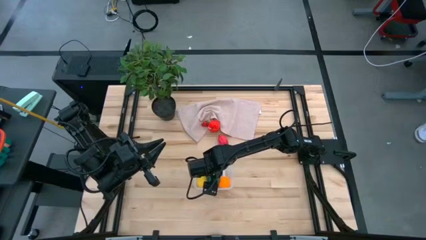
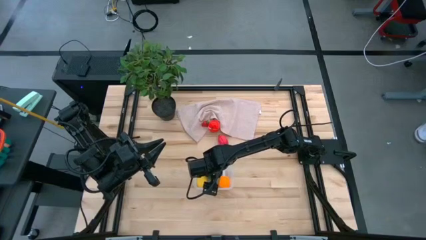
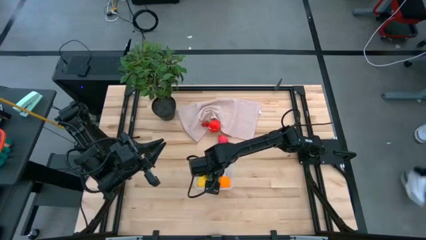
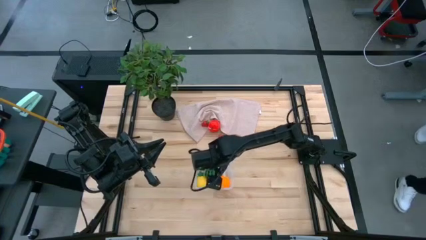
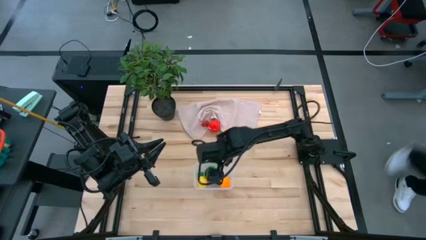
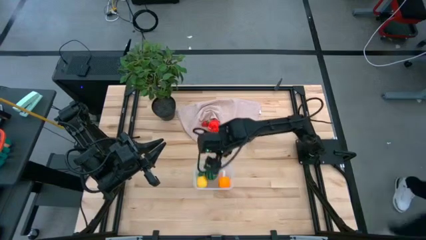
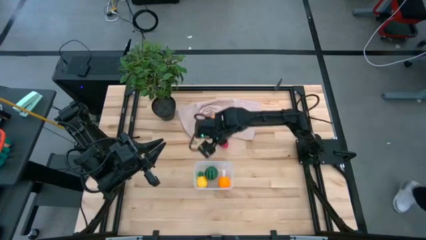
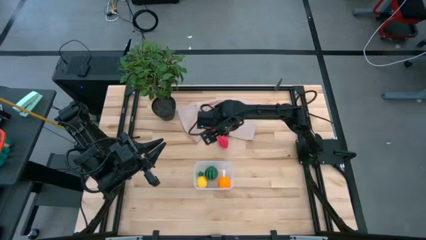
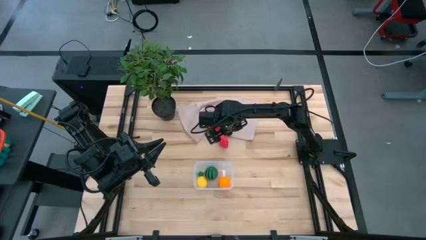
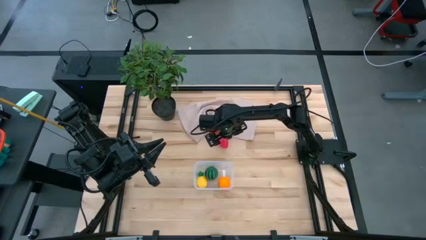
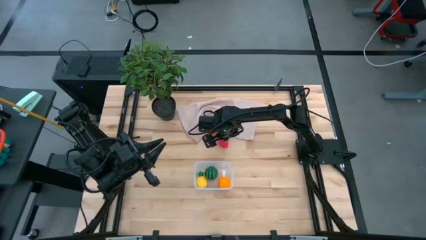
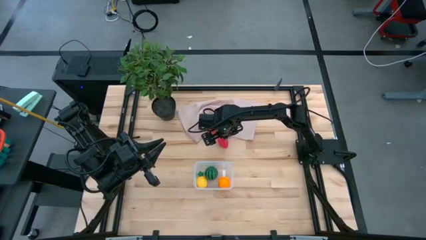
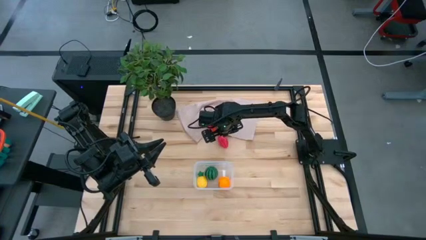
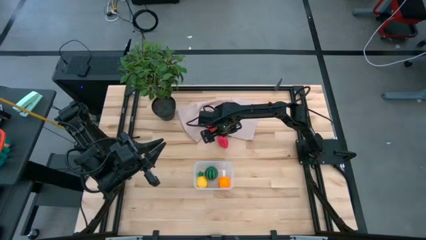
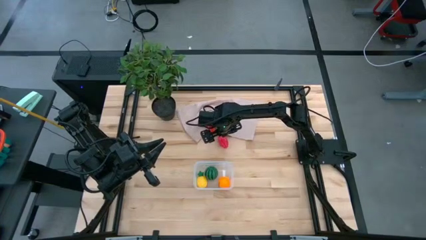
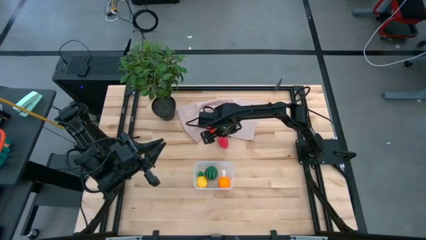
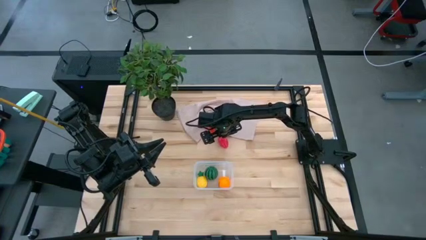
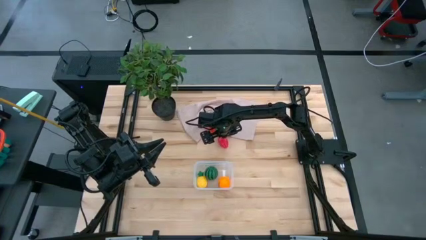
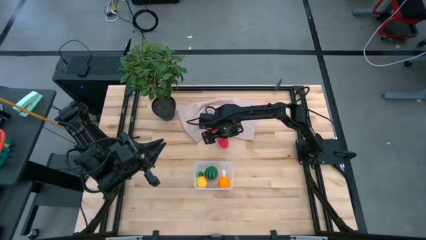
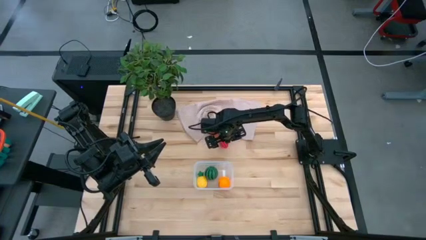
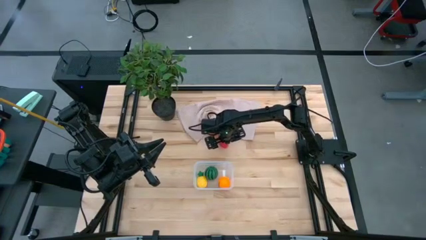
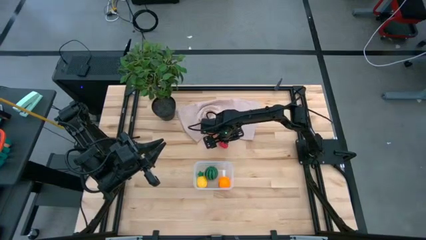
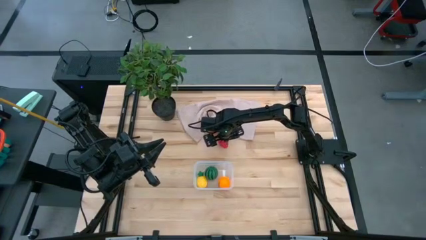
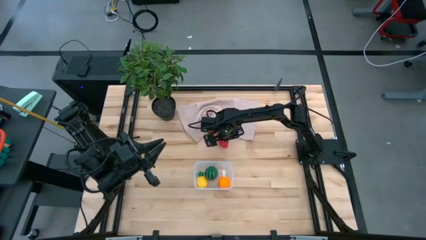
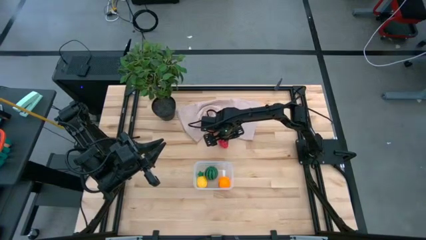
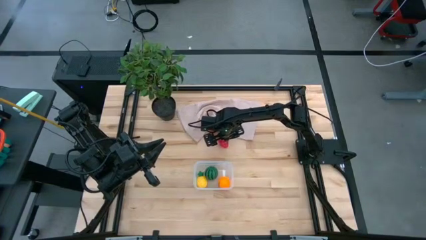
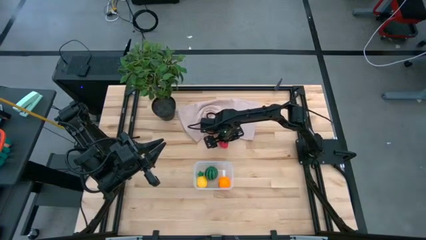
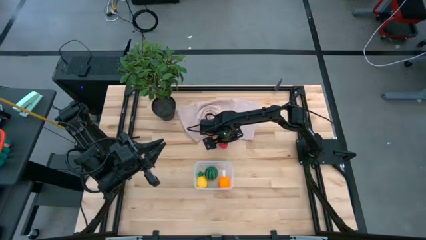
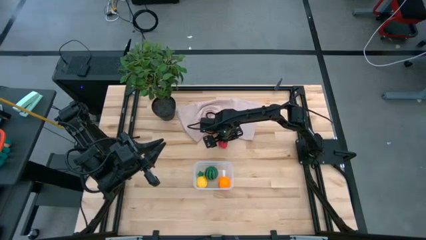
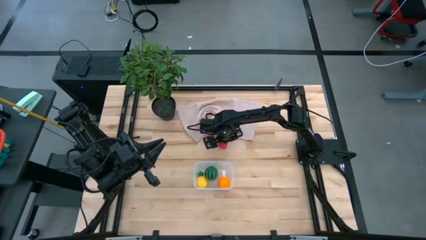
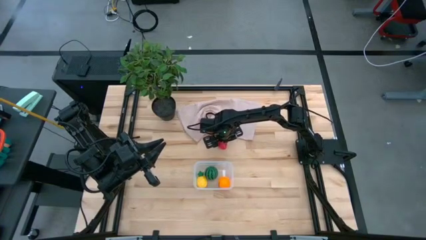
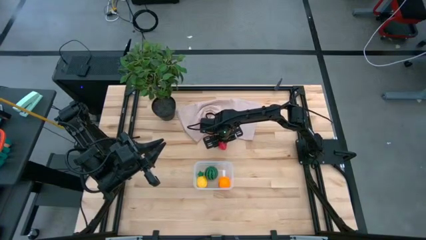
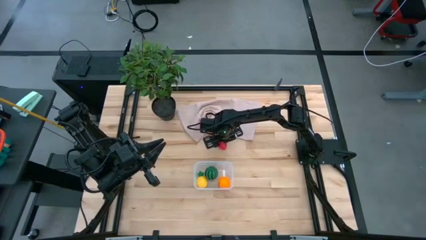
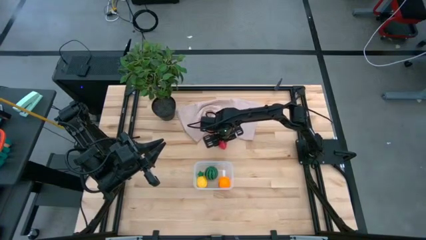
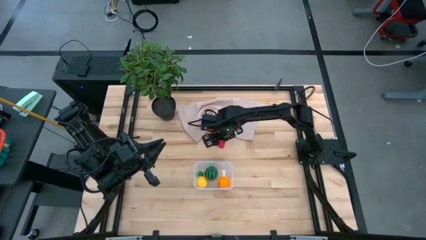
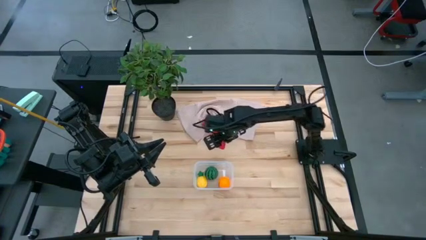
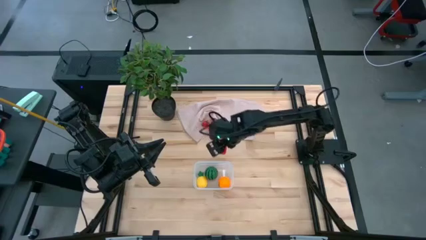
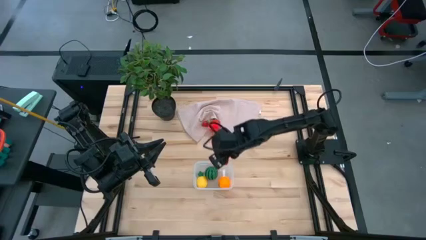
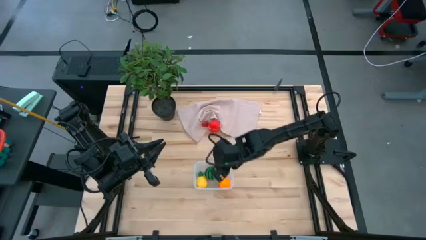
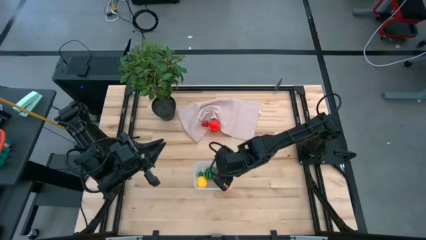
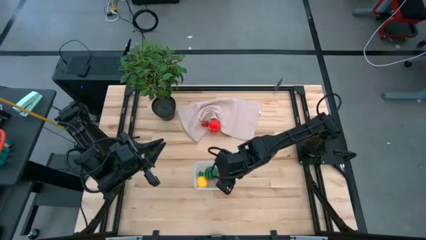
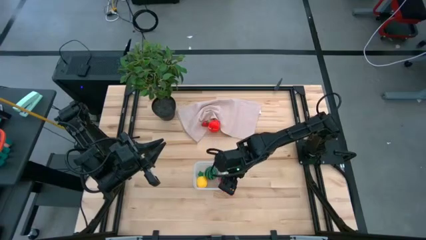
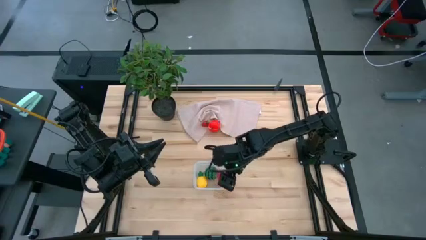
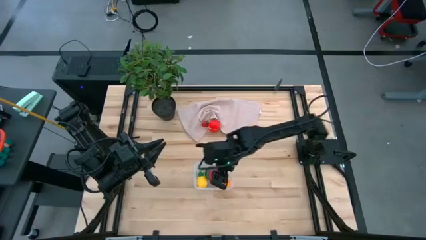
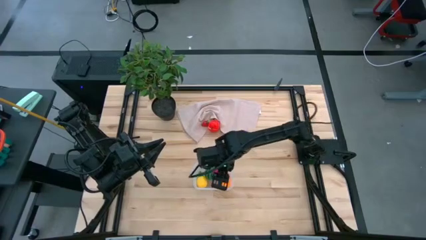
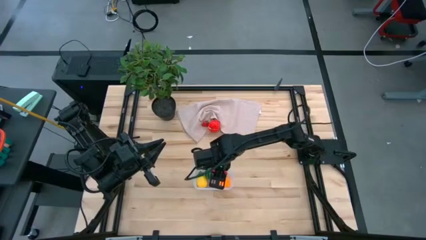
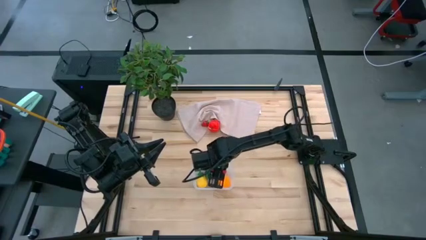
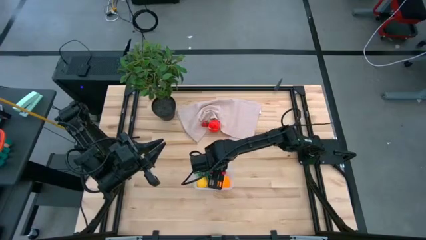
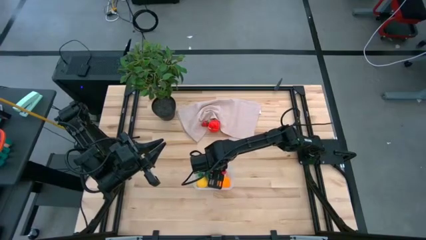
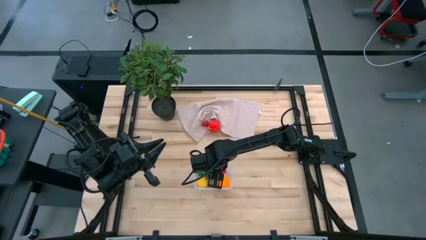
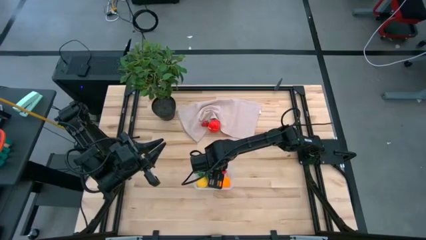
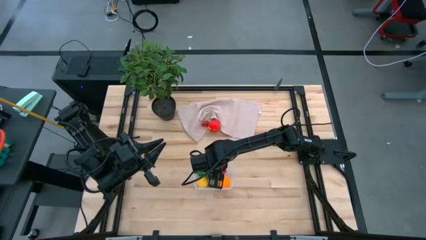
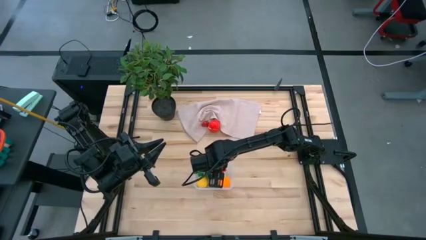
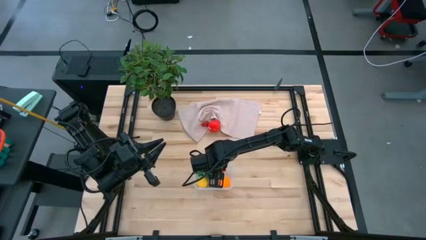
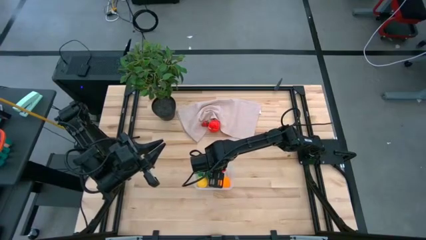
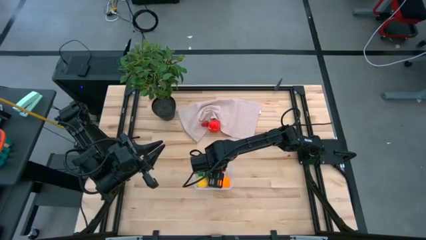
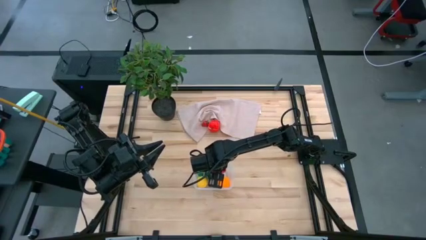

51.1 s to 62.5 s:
Task: Pick and placing Produce into tupperware
Put the dragon fruit into the transparent bin
